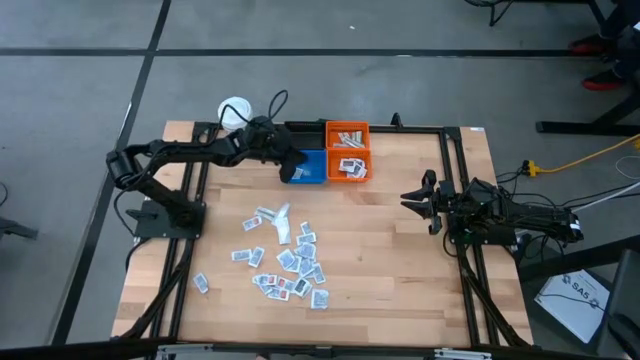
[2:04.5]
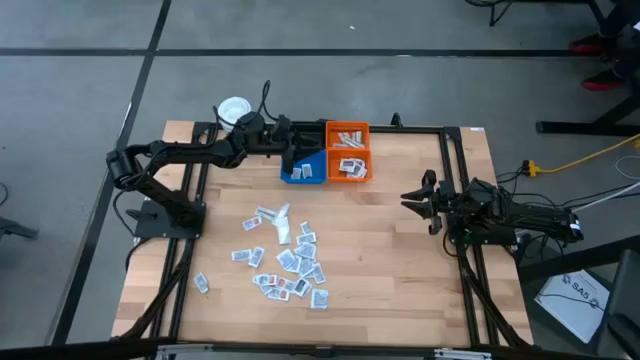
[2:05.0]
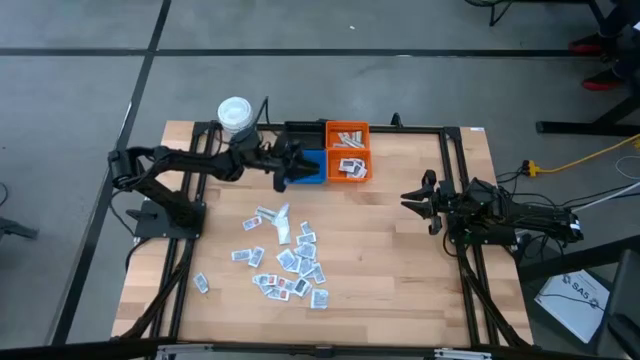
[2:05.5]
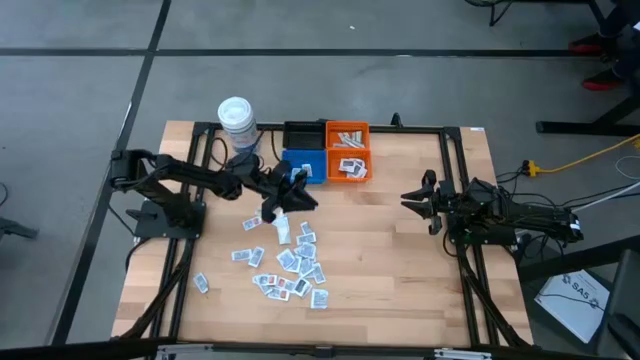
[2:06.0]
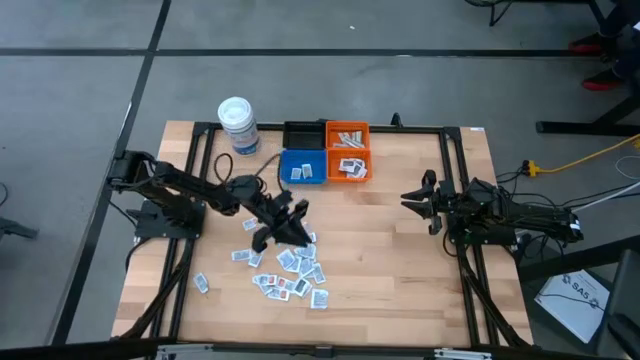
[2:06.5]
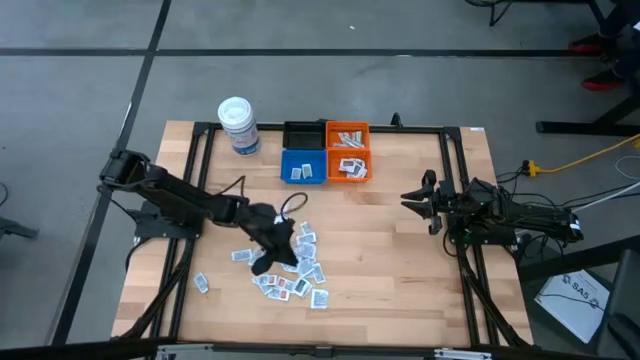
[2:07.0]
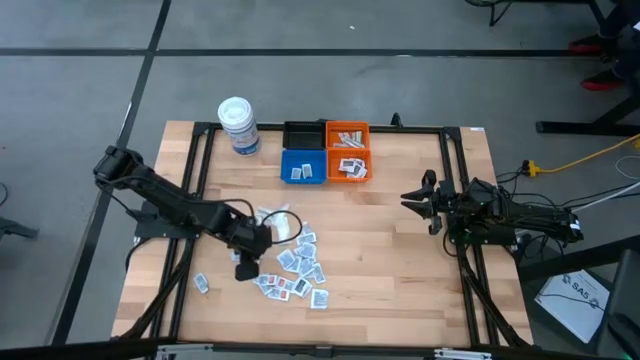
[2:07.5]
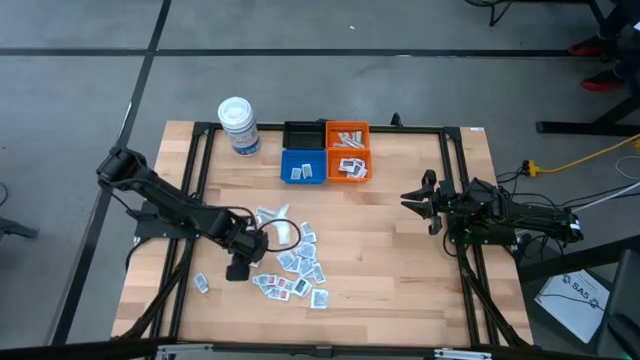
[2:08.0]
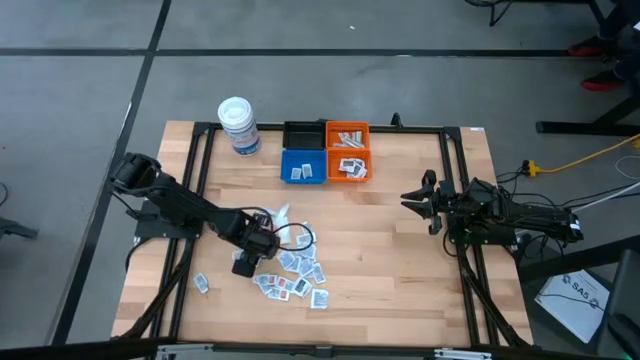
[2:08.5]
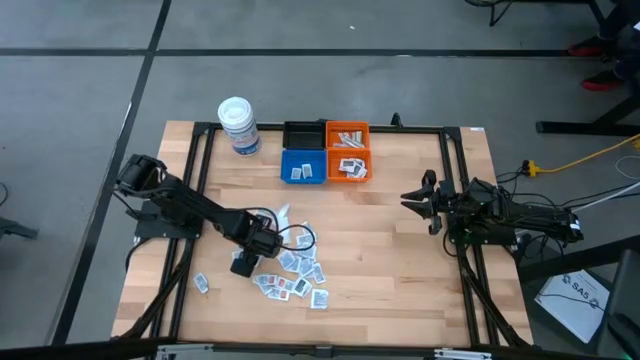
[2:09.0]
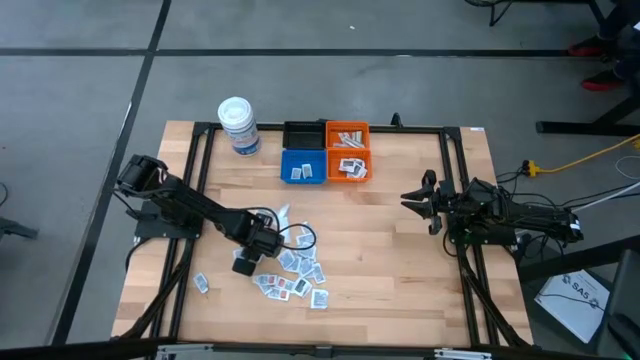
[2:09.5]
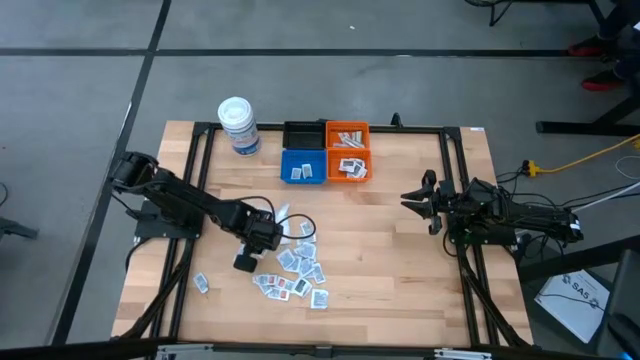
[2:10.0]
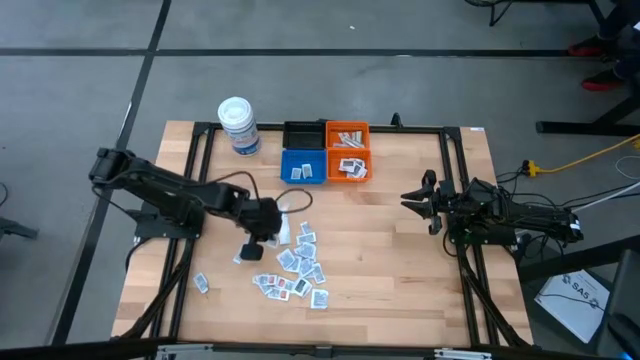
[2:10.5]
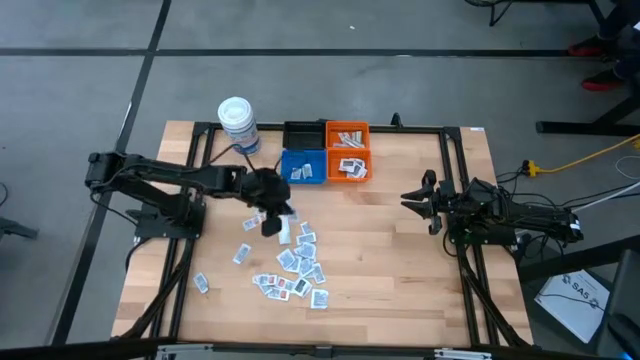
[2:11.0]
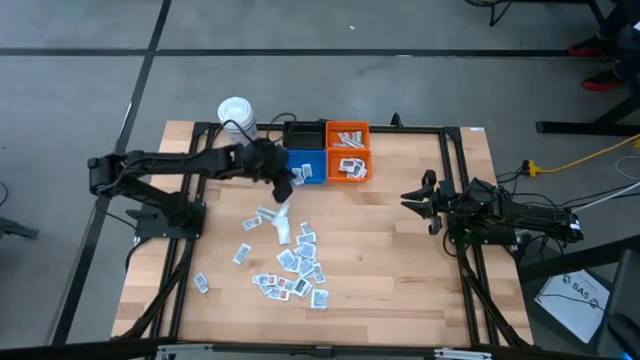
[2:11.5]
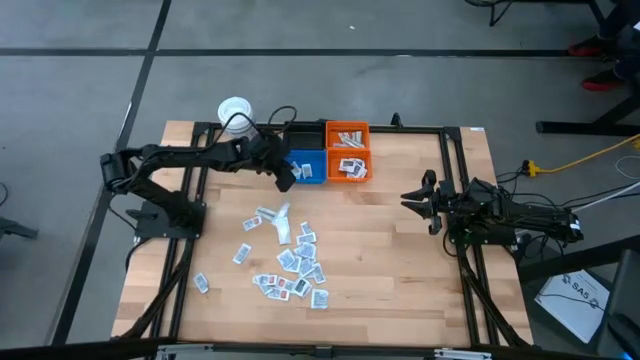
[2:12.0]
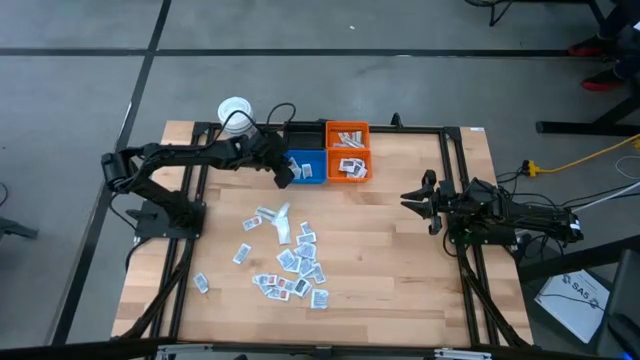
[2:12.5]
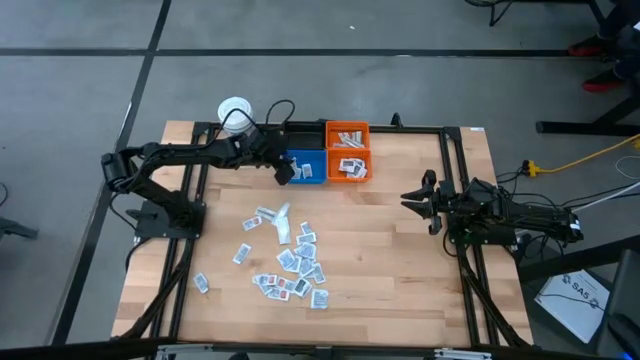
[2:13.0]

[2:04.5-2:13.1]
Task: Pick & Place First Aid Supplies
Put the ointment pack into the blue bin

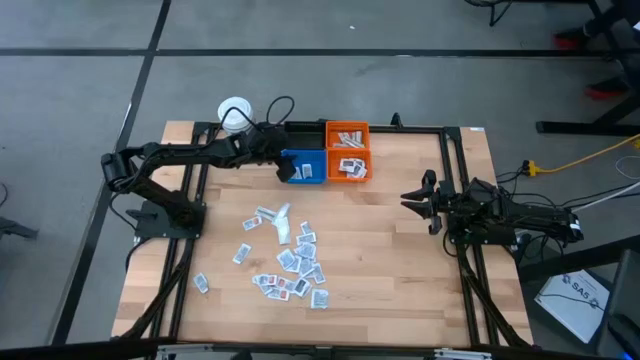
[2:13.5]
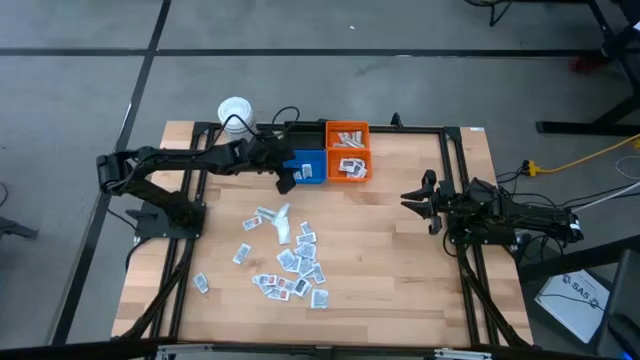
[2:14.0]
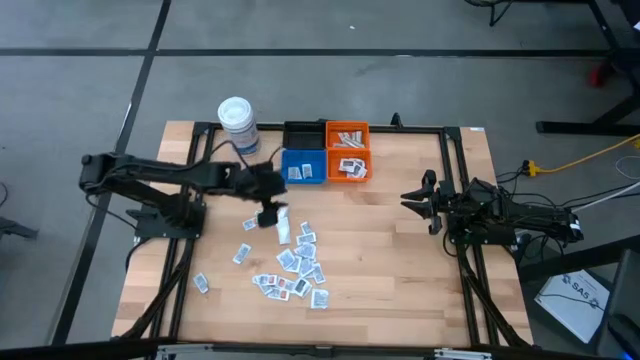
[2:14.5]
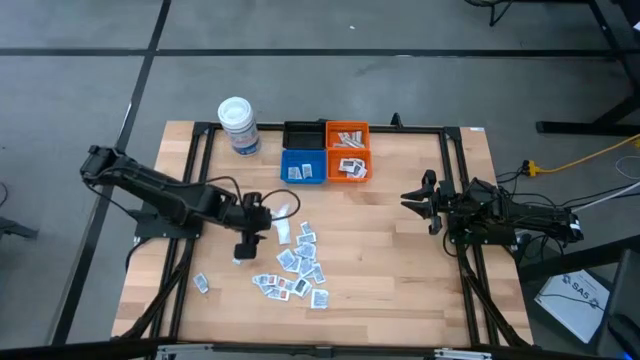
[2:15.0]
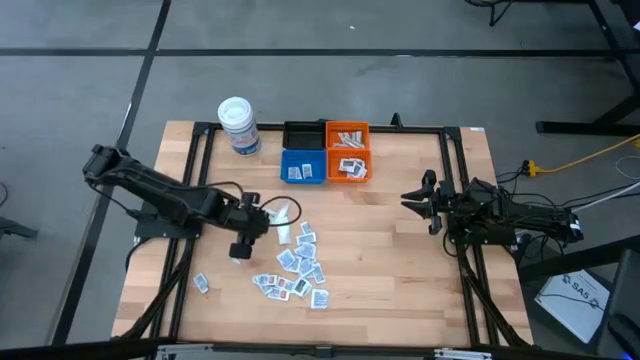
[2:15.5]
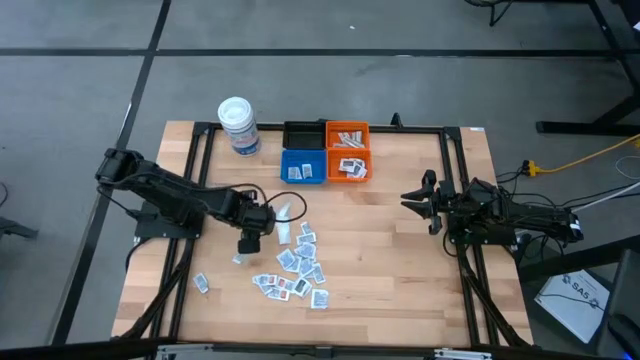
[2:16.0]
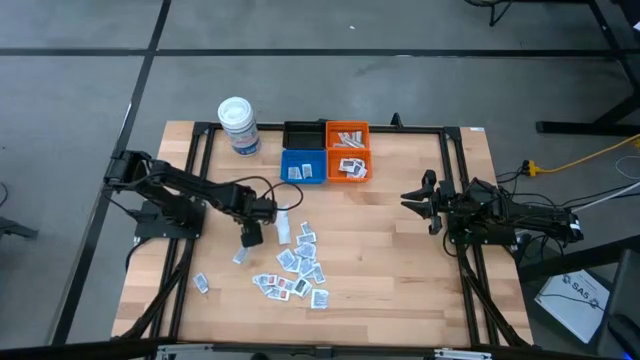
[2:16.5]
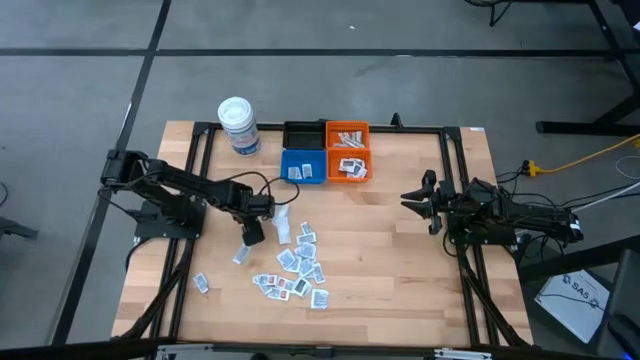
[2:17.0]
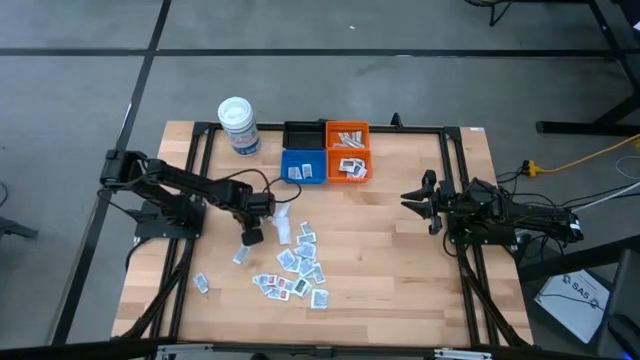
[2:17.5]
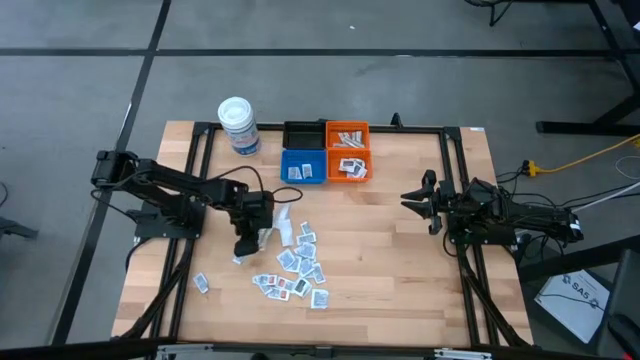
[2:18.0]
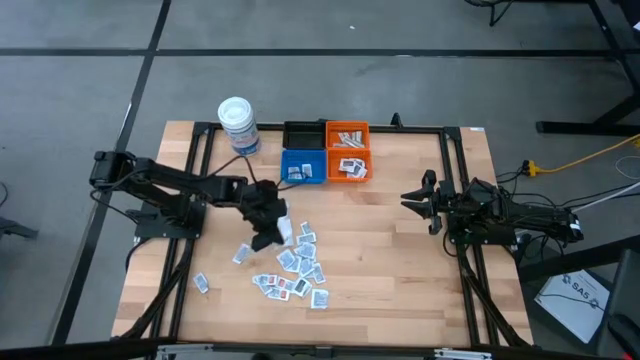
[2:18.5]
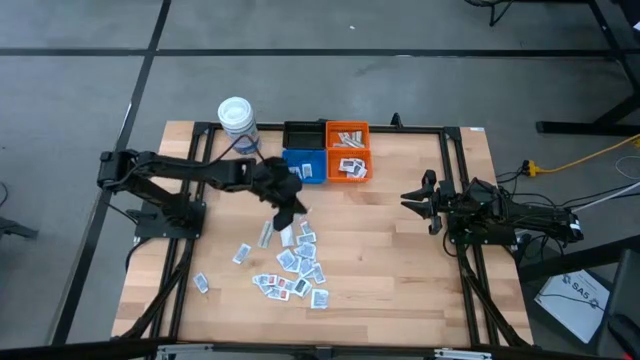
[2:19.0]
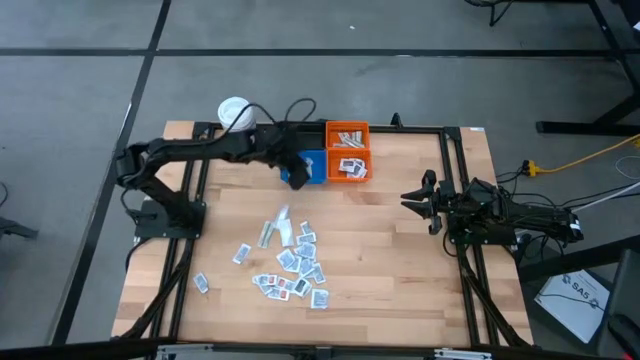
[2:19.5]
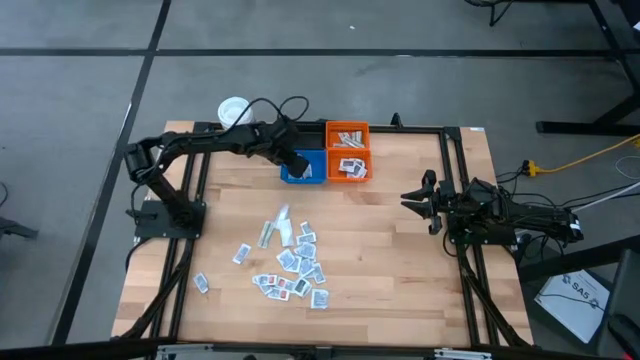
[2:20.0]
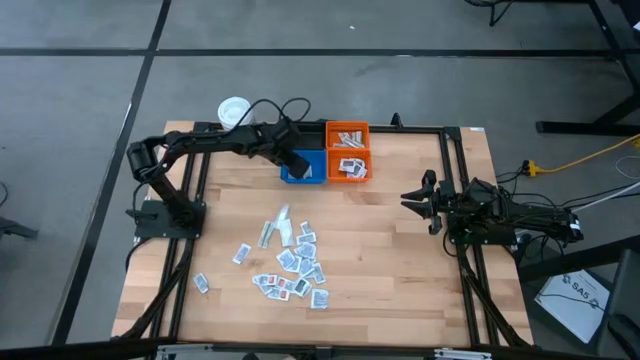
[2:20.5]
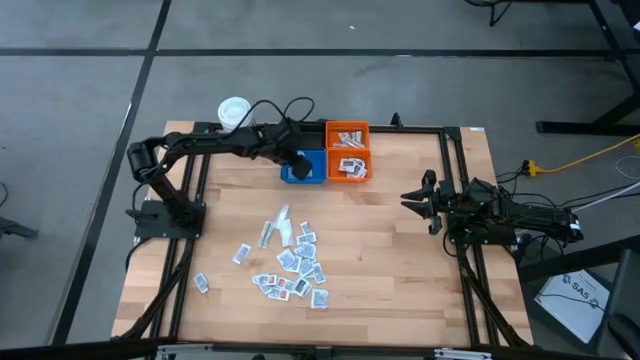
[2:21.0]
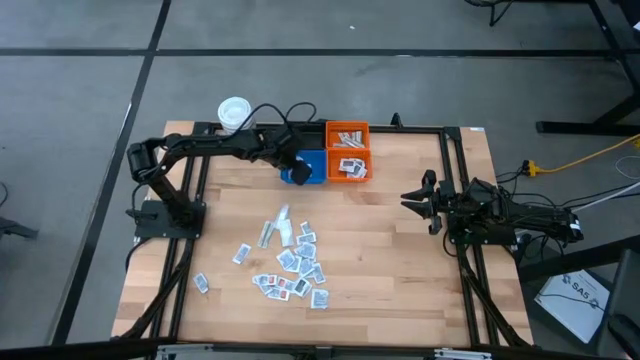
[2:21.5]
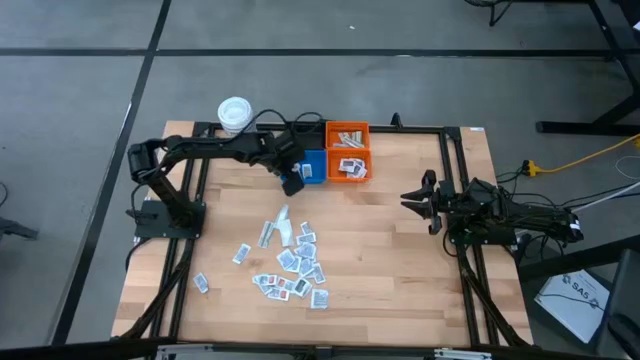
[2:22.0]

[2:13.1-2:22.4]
Put the ointment pack into the blue bin

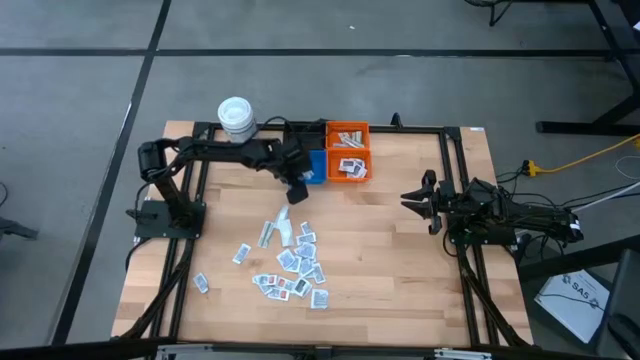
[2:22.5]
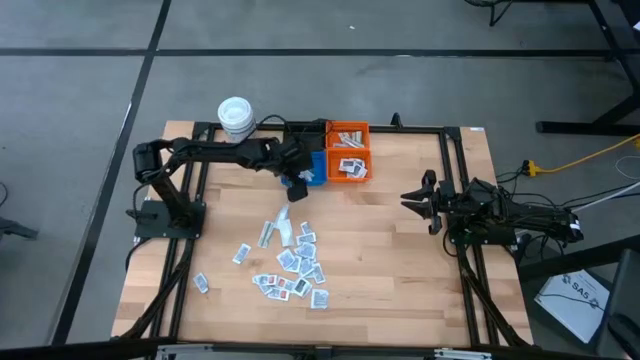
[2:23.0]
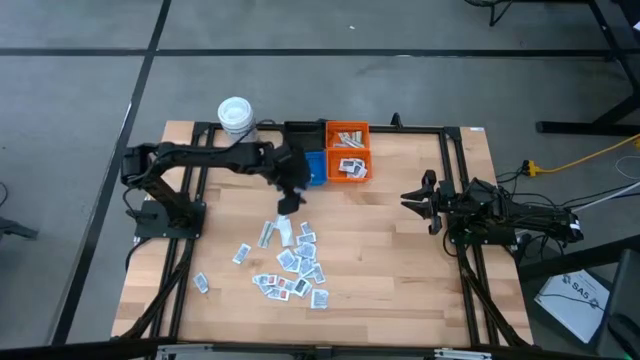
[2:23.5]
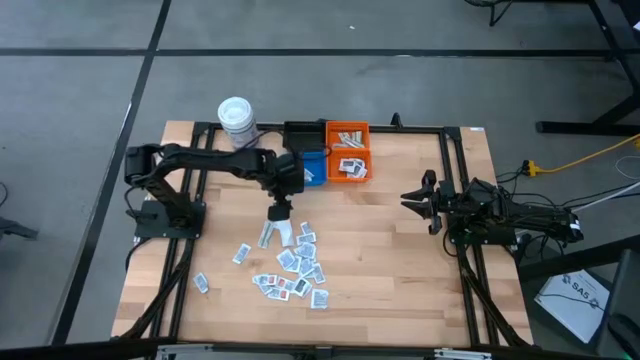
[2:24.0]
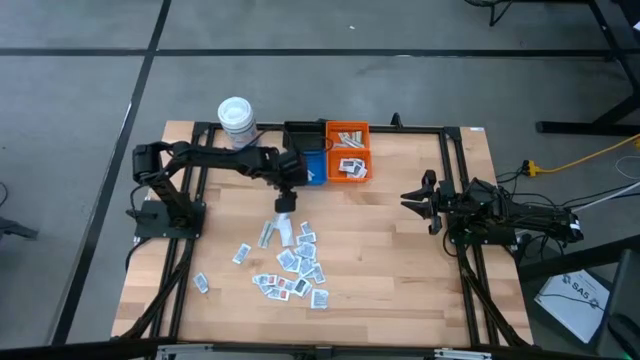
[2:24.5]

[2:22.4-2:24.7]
Adjust the blue bin

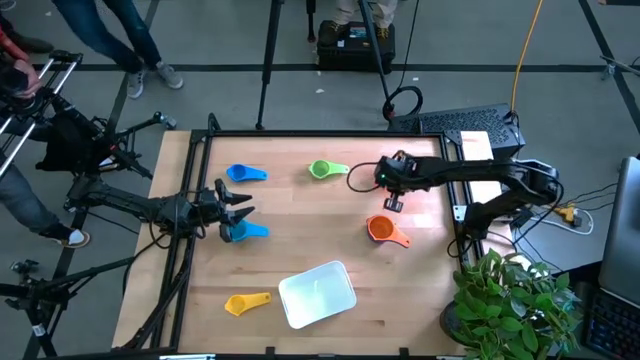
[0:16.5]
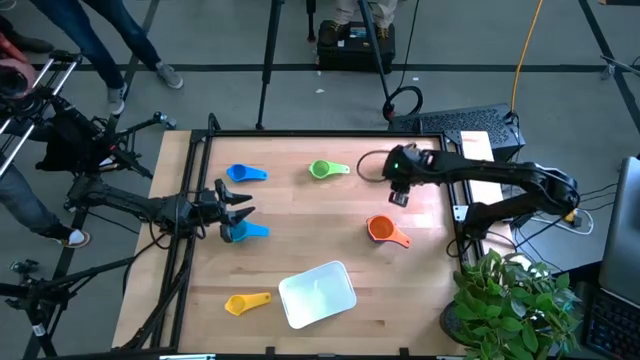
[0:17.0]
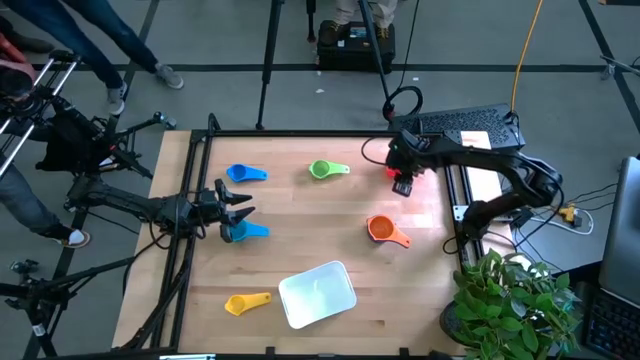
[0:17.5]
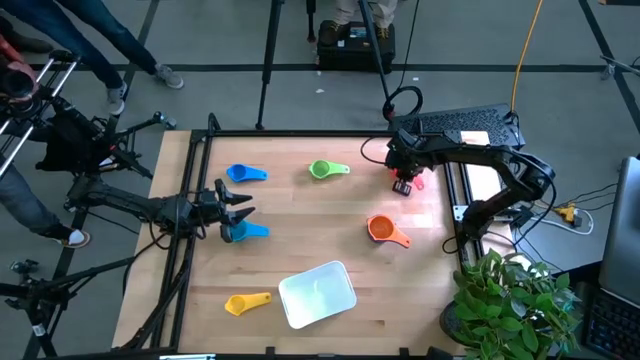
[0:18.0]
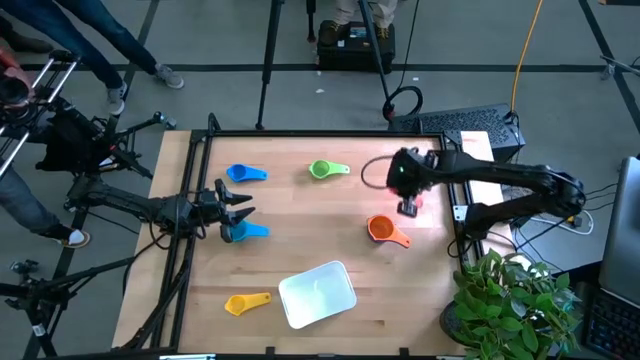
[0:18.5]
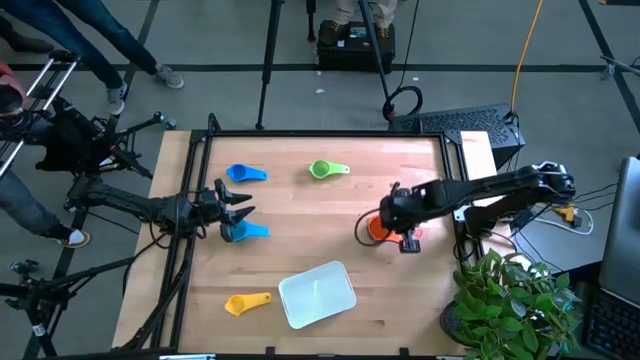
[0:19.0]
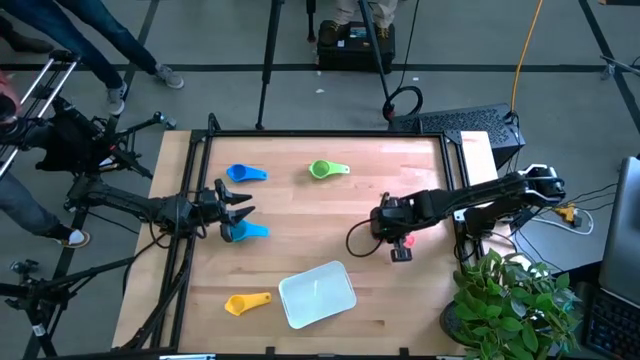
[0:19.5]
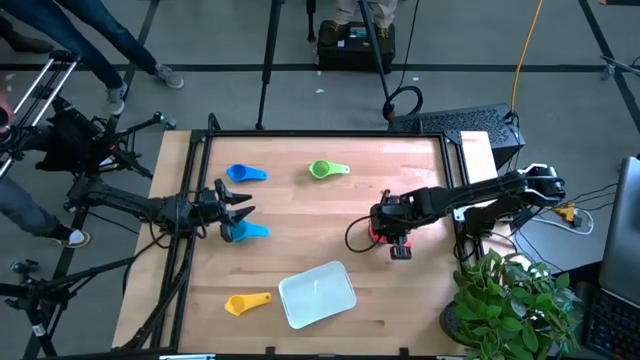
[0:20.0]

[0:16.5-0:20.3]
Task: Nest measuring cups in basket
Stack the red measuring cup on the orange measuring cup
